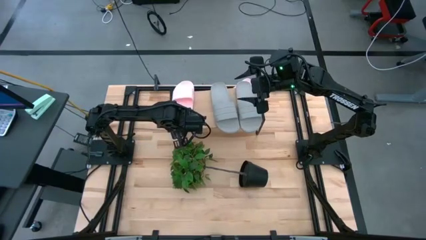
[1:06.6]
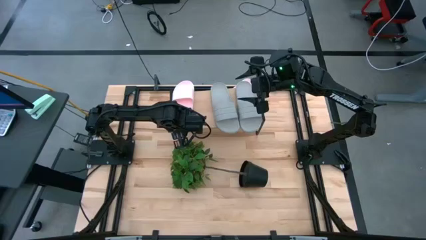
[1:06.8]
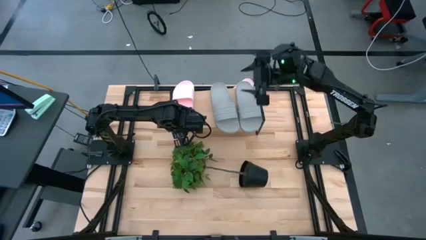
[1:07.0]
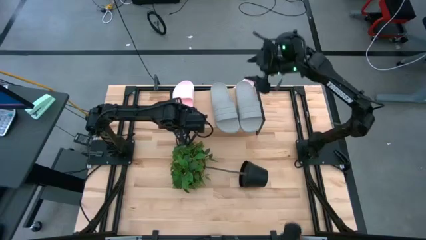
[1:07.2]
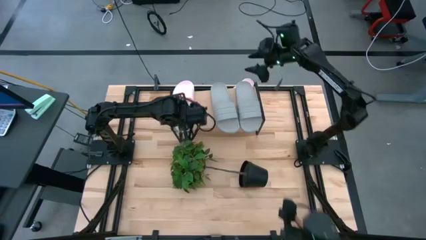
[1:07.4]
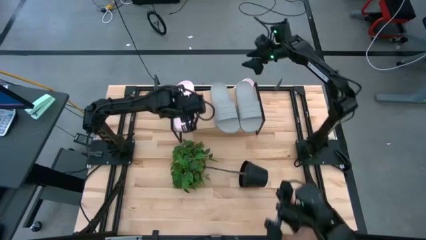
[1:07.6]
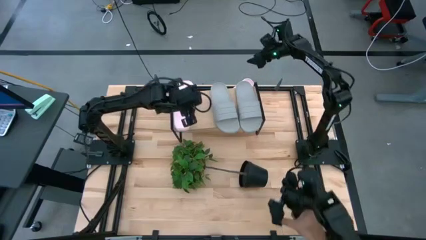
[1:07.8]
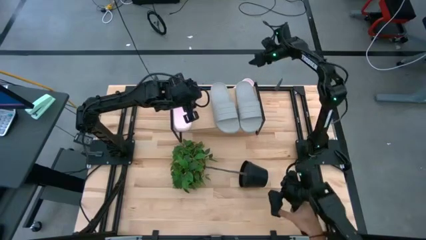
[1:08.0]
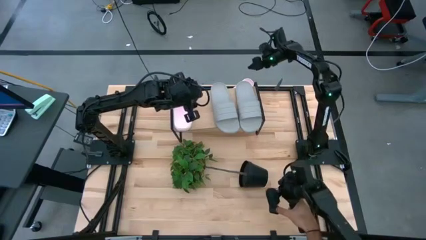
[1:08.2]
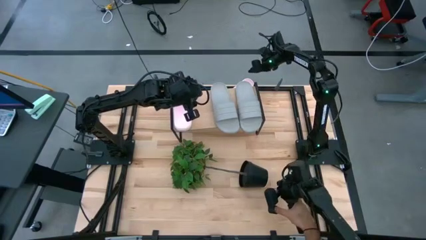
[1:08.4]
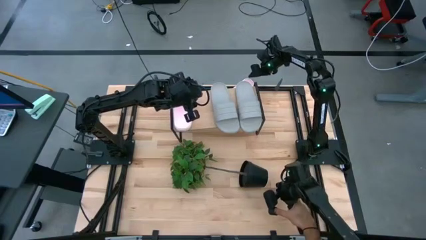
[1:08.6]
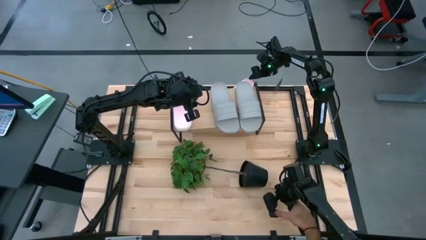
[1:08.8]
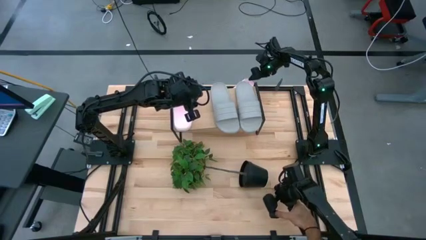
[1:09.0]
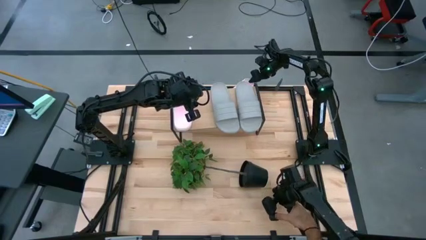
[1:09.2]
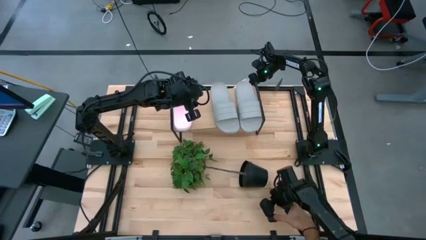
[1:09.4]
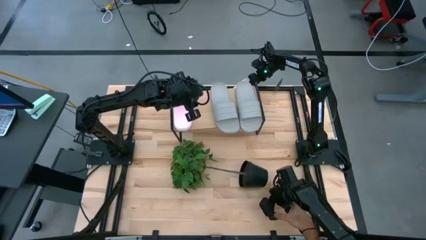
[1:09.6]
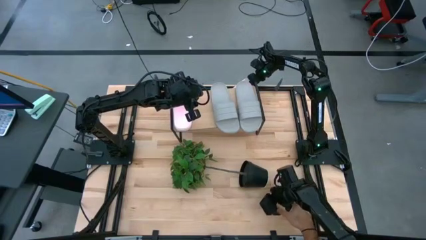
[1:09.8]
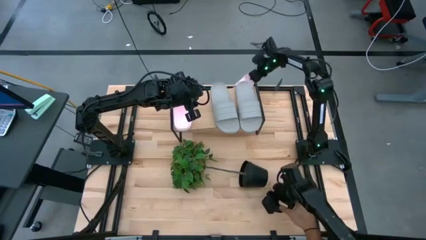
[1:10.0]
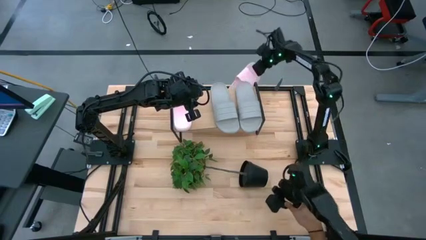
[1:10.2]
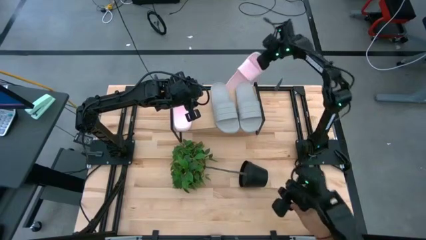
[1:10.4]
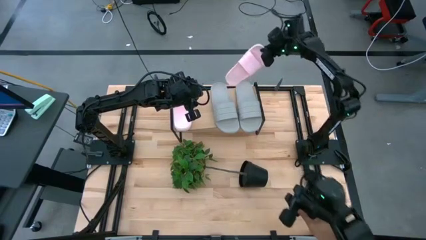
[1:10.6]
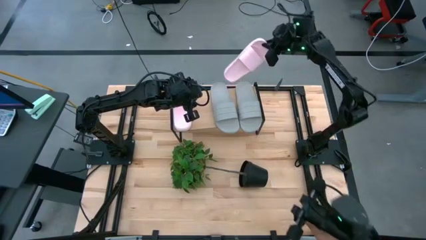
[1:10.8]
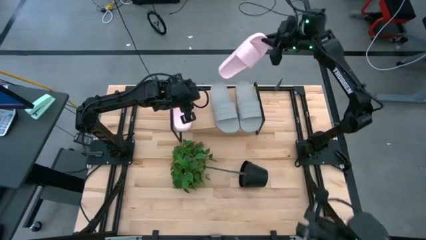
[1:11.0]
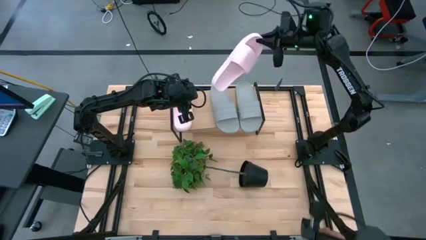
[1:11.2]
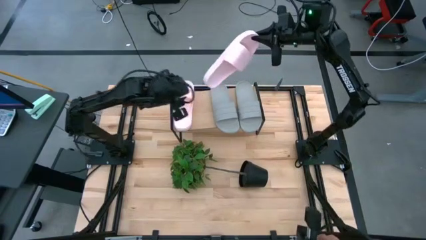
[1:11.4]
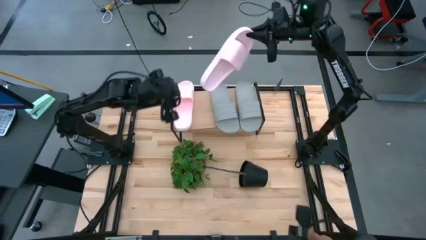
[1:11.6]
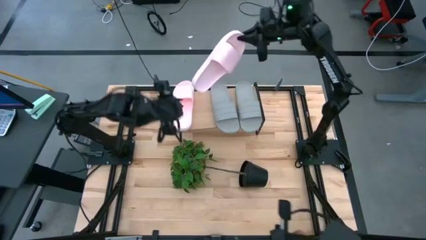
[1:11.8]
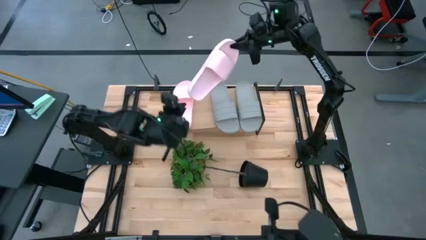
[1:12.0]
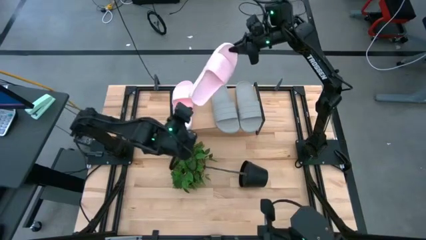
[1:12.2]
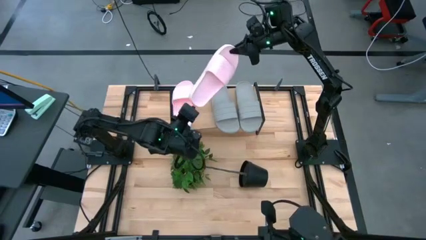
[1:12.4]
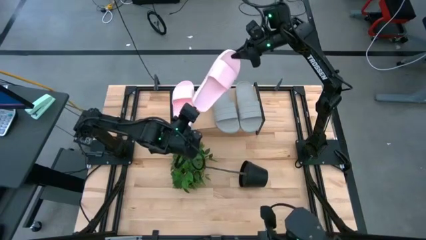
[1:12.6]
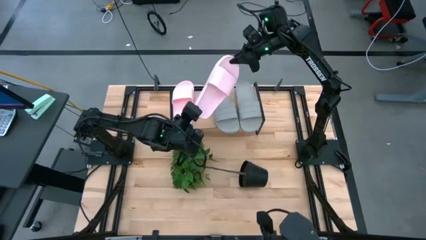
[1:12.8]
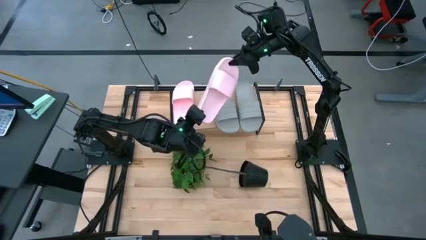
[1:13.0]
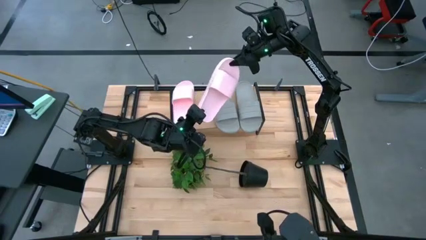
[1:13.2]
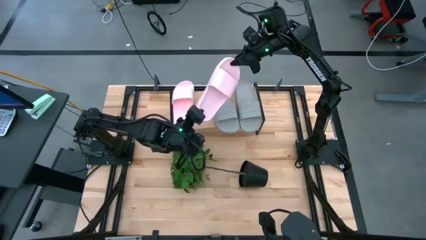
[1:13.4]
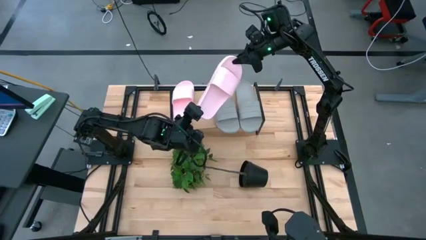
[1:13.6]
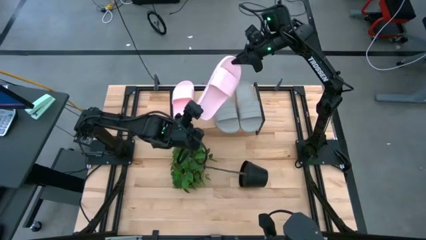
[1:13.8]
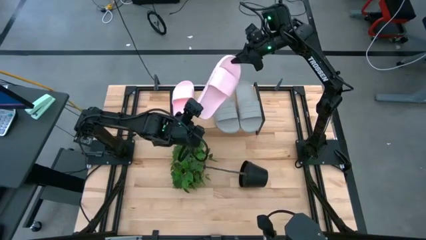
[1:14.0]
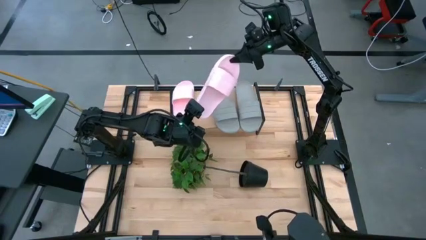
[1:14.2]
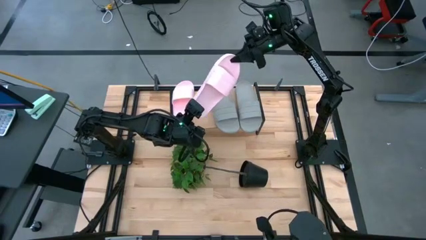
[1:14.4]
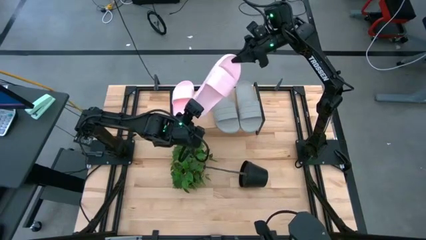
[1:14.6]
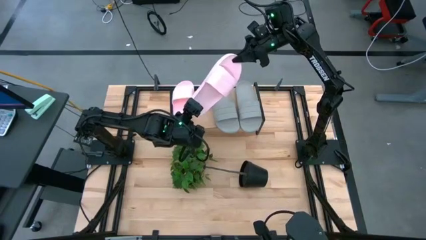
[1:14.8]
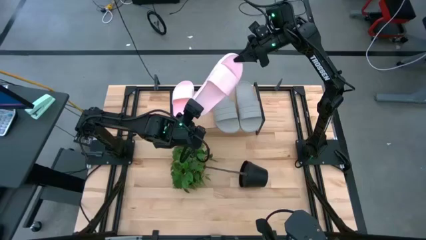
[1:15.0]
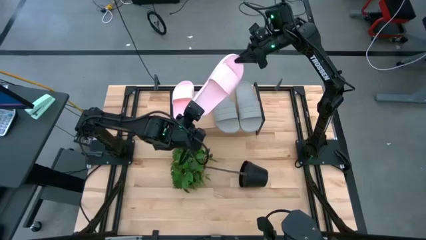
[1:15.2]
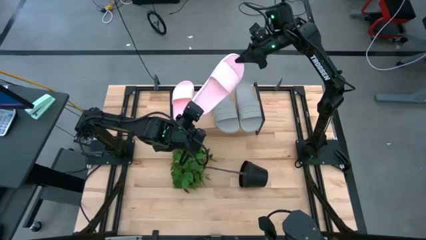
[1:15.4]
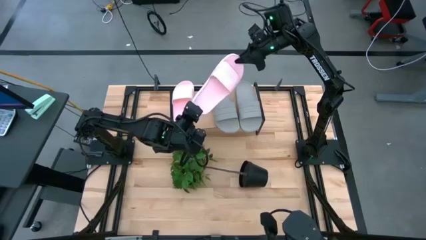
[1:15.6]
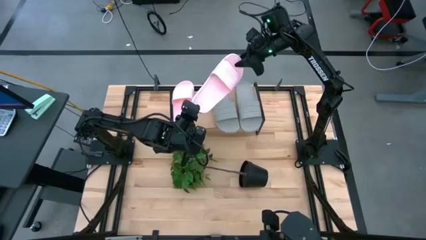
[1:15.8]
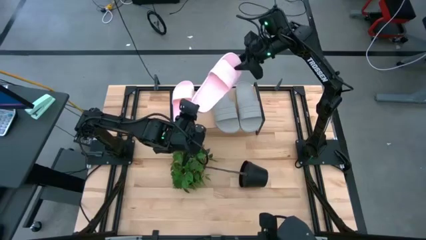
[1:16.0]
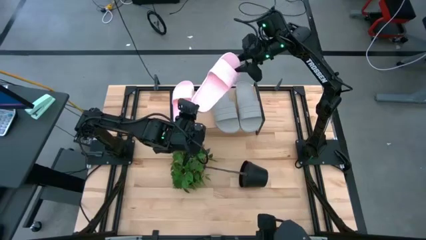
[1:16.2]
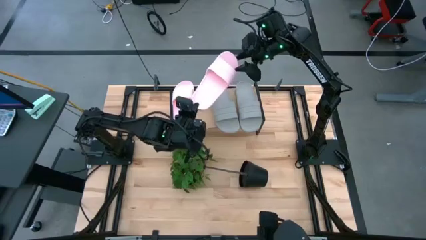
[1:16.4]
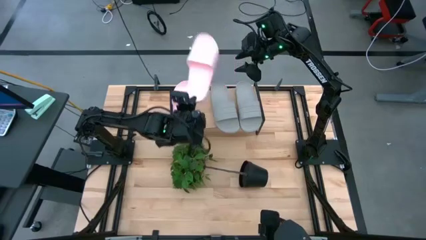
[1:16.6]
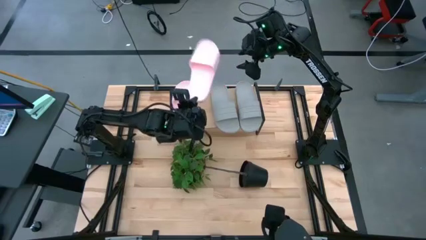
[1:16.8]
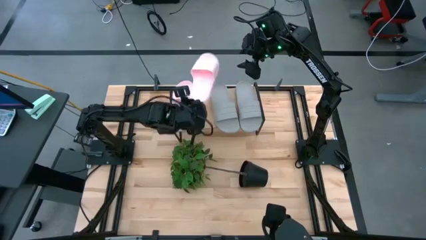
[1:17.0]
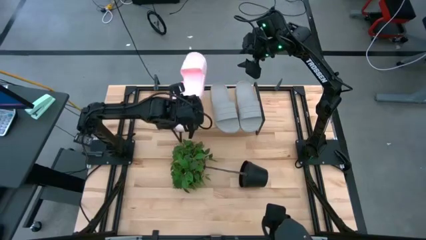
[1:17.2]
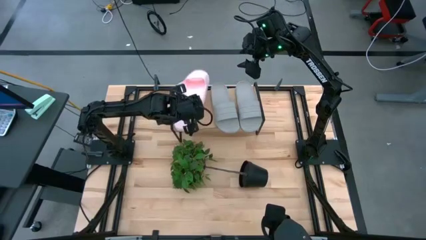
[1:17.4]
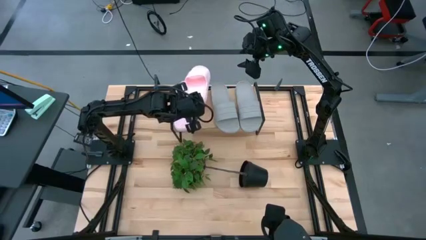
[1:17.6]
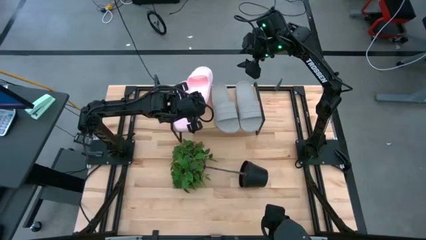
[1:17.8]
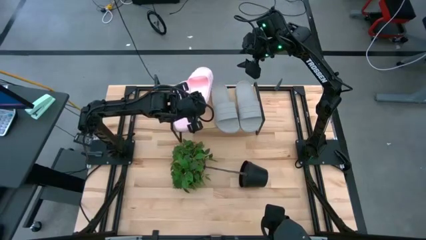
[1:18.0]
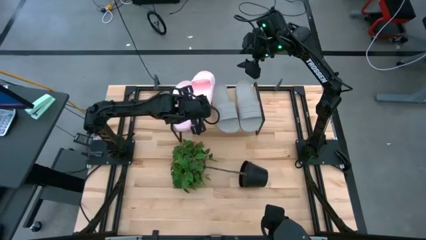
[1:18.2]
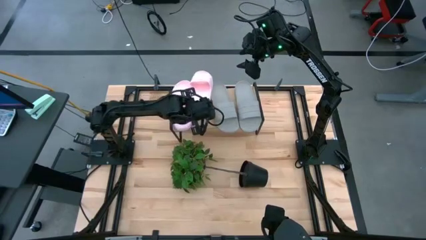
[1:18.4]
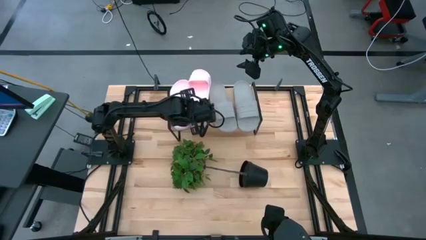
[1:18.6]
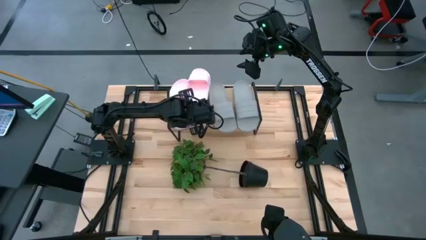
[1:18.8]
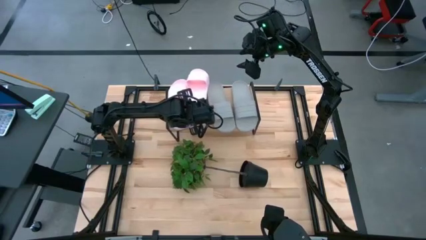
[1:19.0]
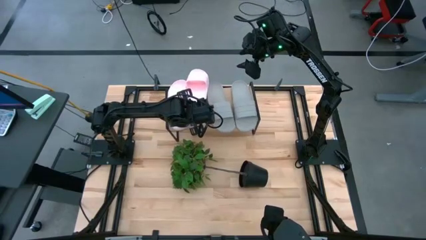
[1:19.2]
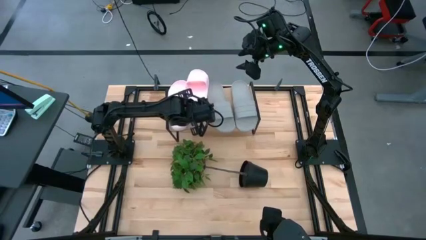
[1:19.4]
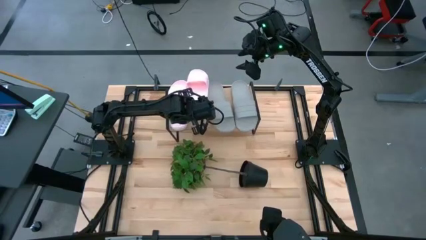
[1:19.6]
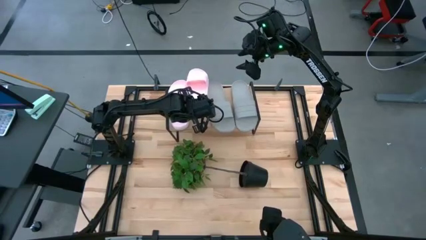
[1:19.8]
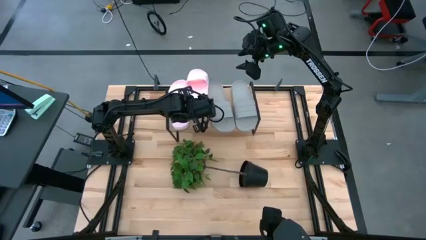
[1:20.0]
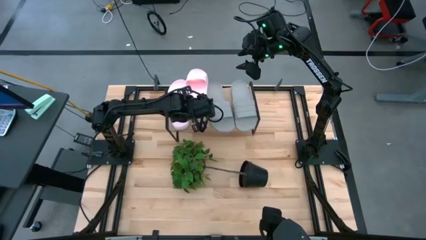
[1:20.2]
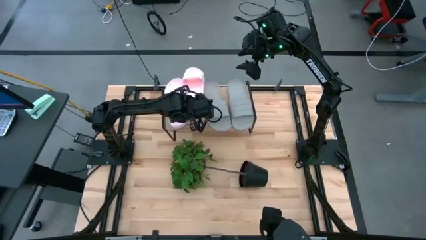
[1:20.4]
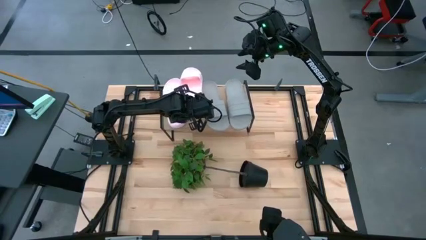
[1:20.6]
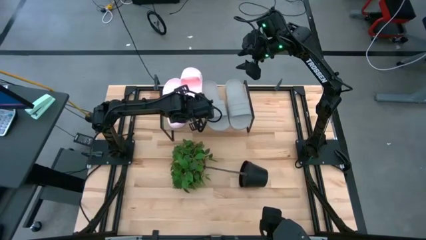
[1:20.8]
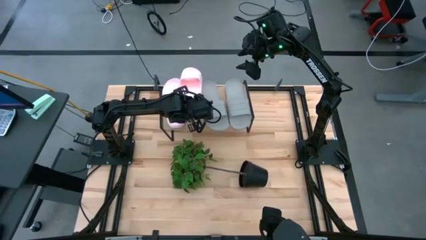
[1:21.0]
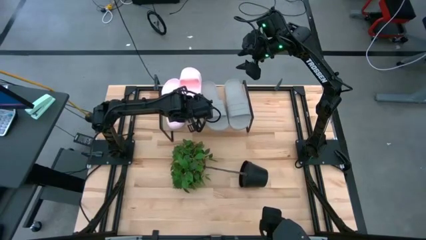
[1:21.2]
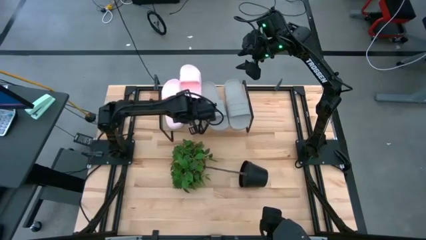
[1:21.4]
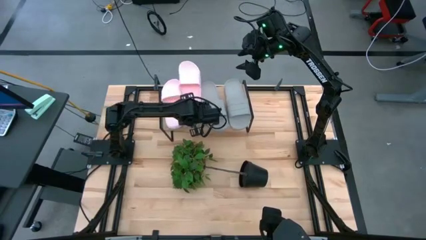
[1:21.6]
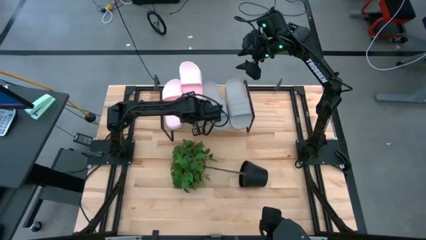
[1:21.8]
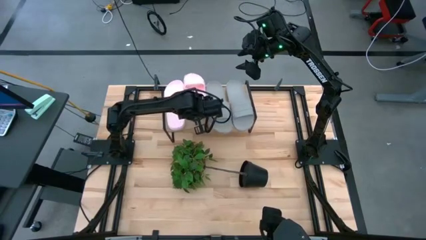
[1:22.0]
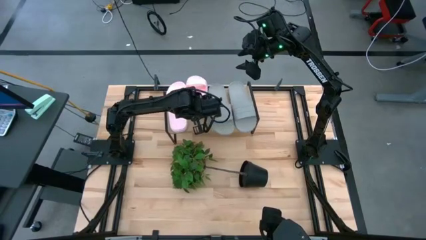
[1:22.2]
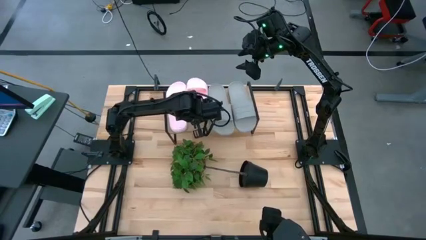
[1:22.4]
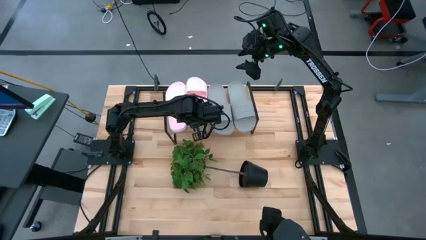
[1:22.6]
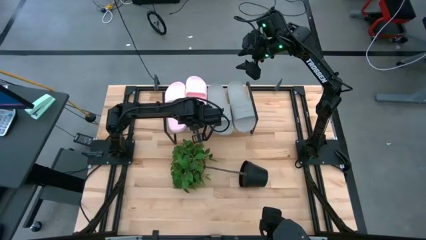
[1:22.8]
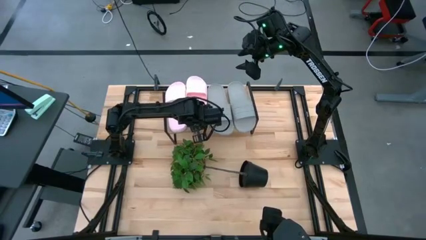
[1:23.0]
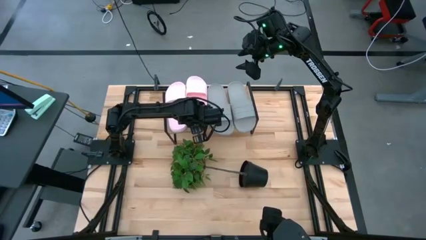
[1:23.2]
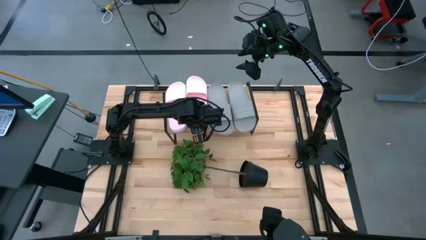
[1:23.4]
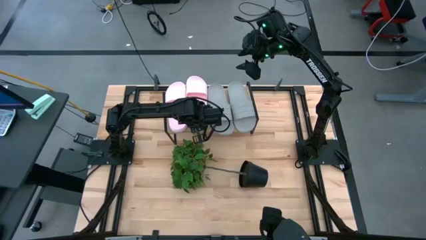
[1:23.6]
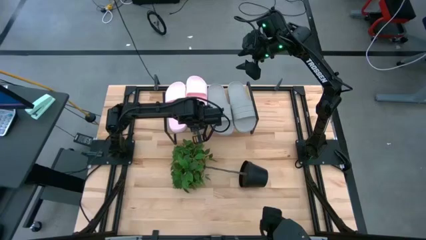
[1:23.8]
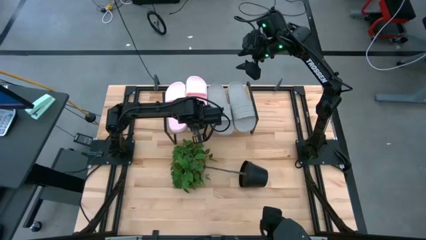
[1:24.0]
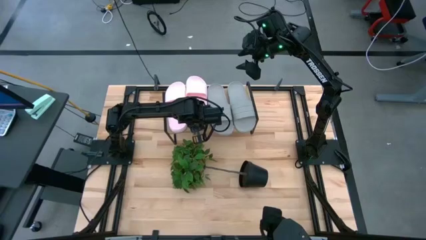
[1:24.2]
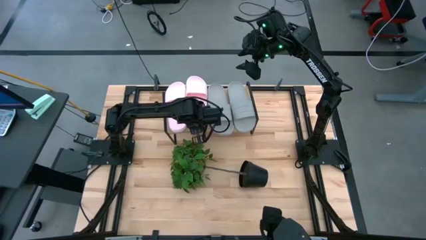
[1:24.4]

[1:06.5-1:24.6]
Task: Pick and place slides into the shelf
Put the pink slide on the shelf
